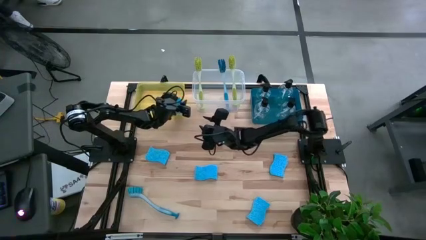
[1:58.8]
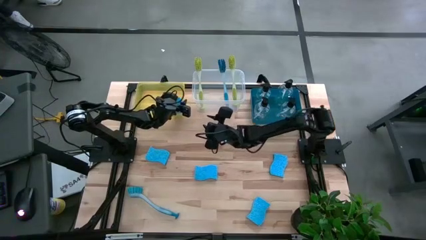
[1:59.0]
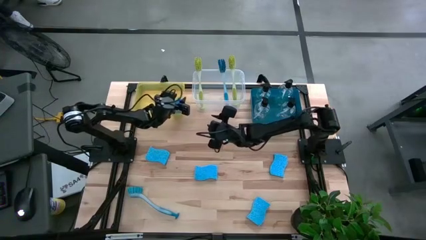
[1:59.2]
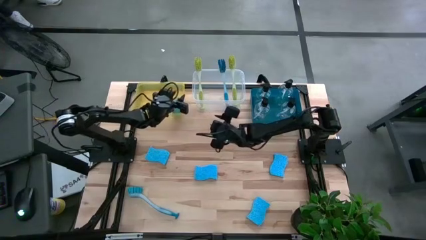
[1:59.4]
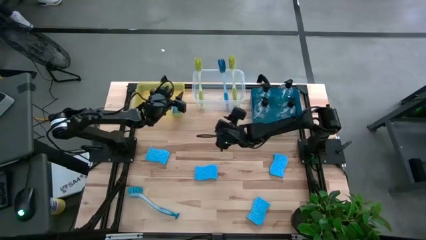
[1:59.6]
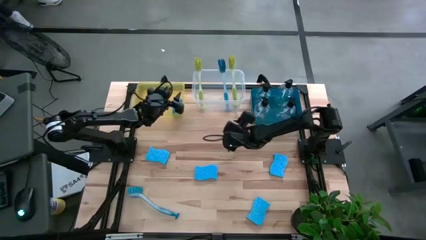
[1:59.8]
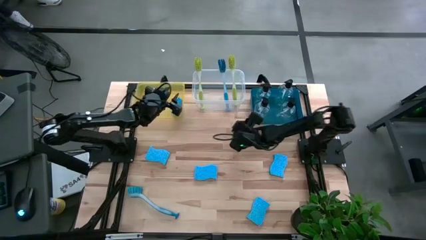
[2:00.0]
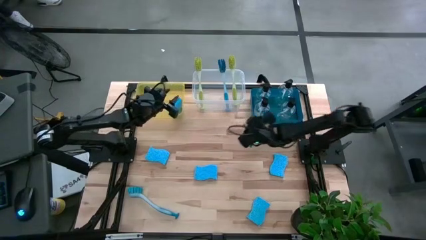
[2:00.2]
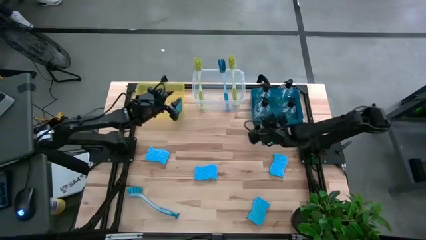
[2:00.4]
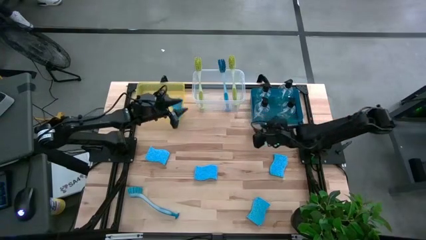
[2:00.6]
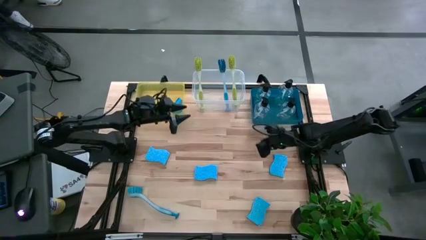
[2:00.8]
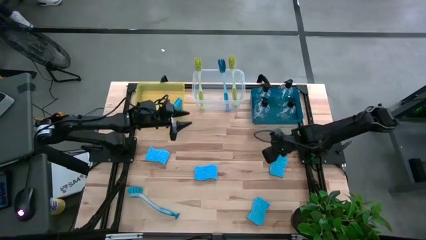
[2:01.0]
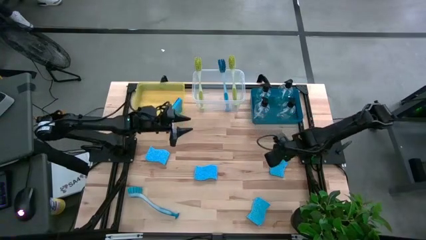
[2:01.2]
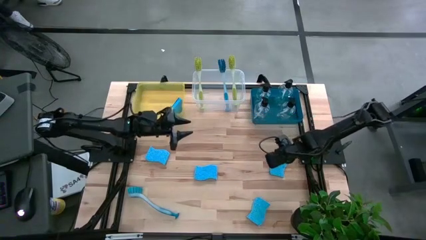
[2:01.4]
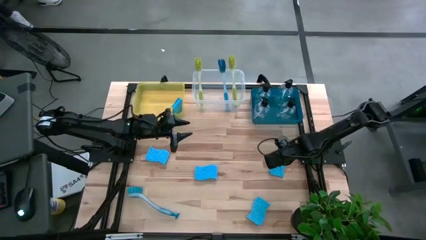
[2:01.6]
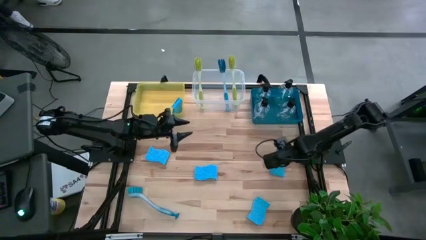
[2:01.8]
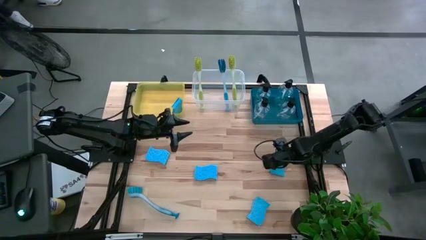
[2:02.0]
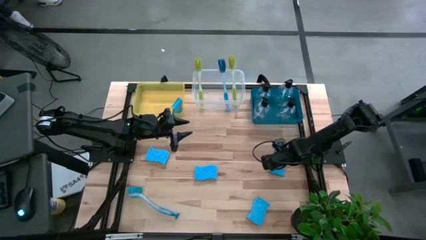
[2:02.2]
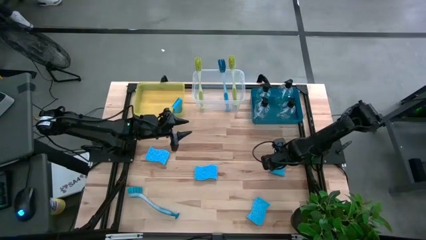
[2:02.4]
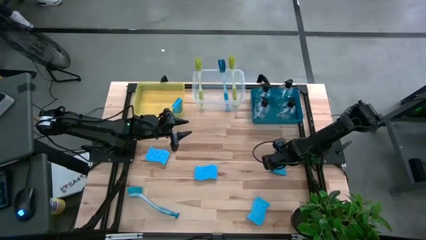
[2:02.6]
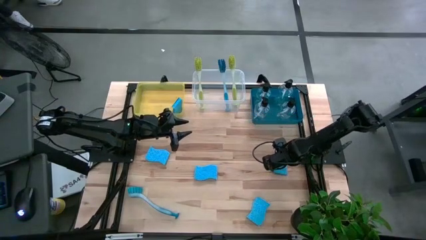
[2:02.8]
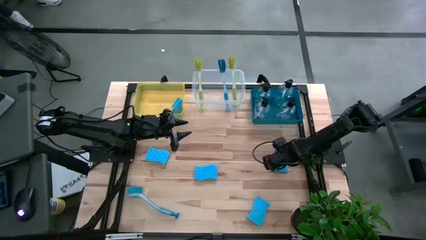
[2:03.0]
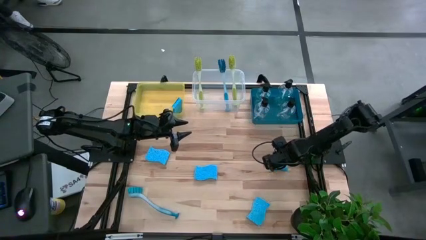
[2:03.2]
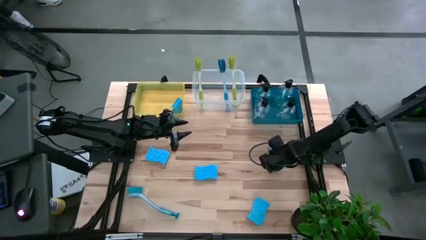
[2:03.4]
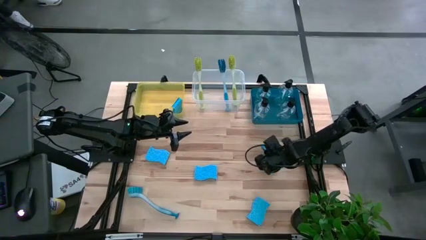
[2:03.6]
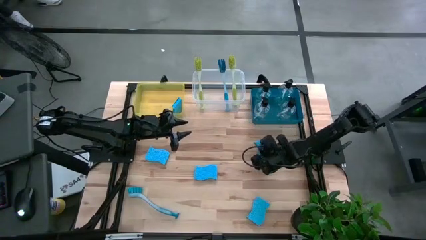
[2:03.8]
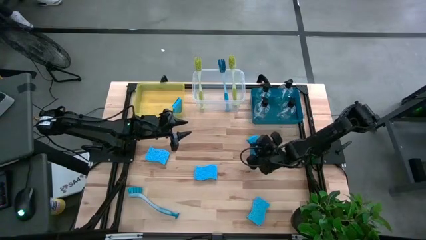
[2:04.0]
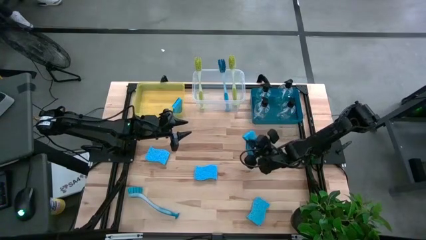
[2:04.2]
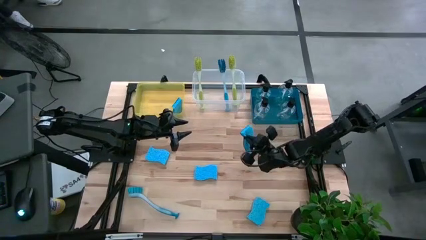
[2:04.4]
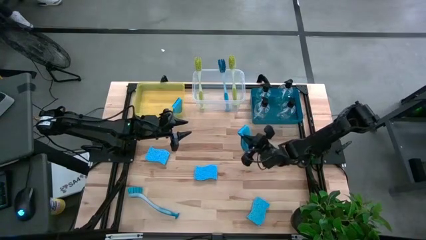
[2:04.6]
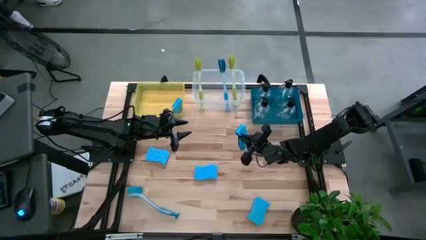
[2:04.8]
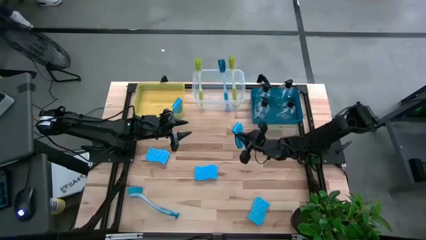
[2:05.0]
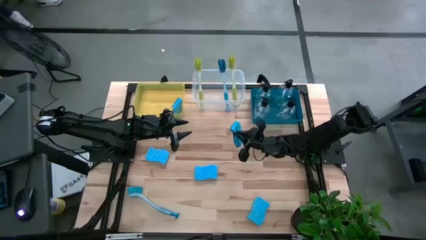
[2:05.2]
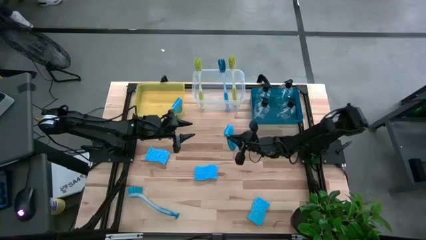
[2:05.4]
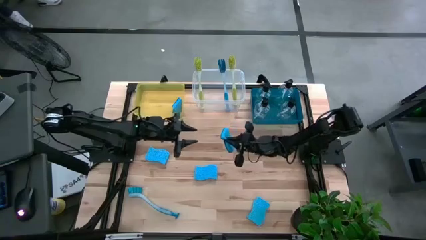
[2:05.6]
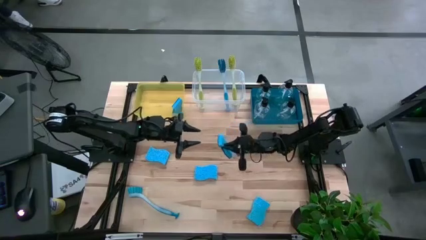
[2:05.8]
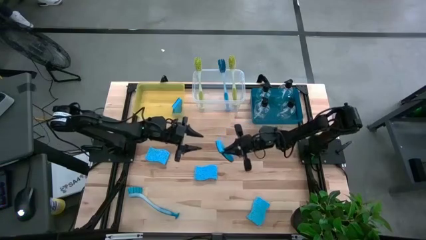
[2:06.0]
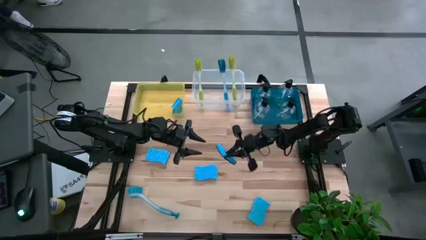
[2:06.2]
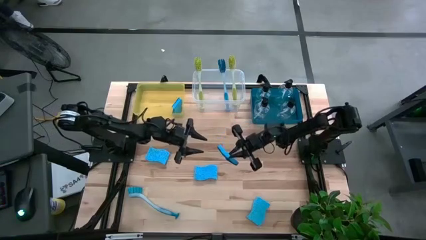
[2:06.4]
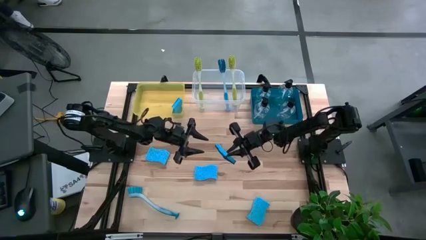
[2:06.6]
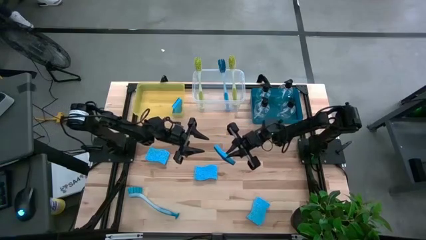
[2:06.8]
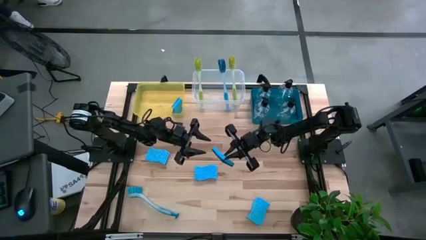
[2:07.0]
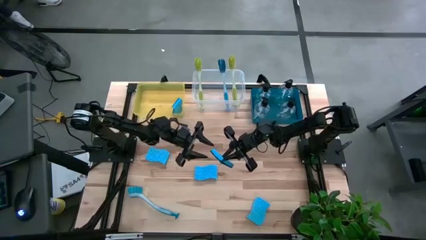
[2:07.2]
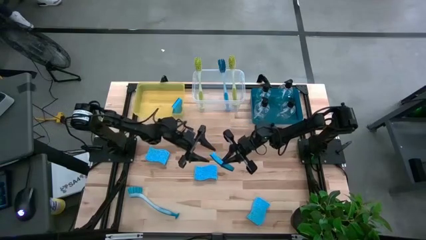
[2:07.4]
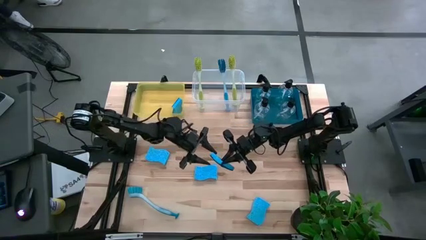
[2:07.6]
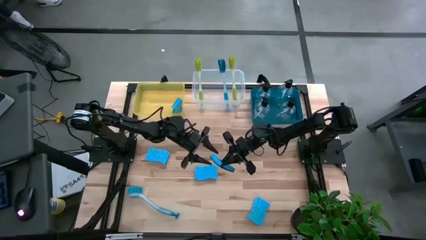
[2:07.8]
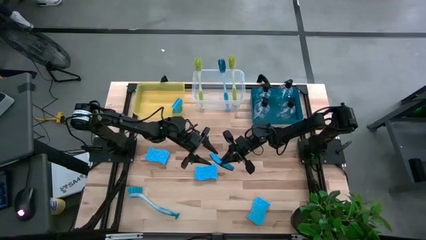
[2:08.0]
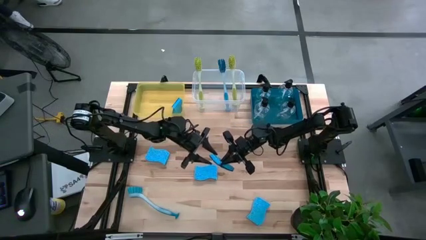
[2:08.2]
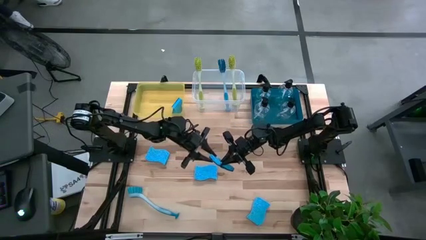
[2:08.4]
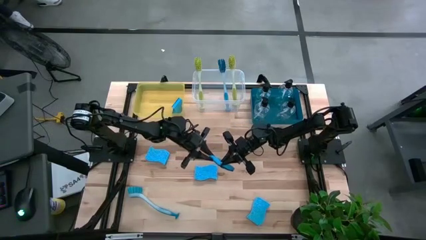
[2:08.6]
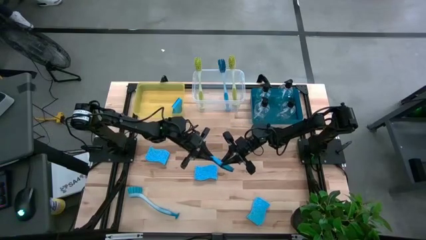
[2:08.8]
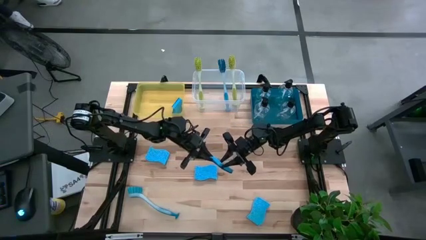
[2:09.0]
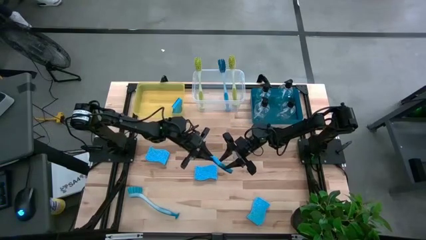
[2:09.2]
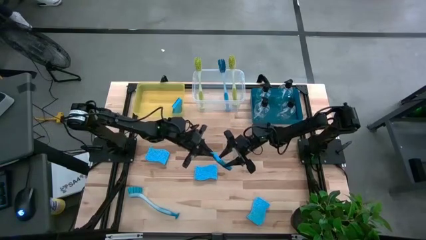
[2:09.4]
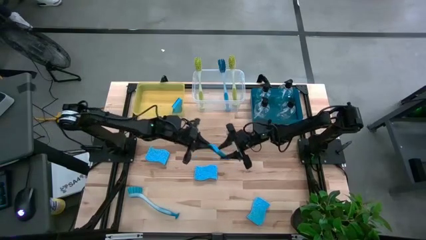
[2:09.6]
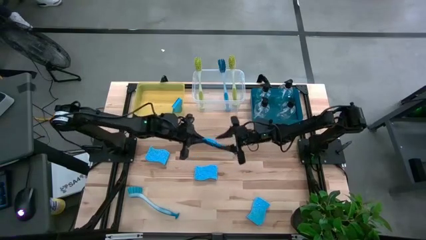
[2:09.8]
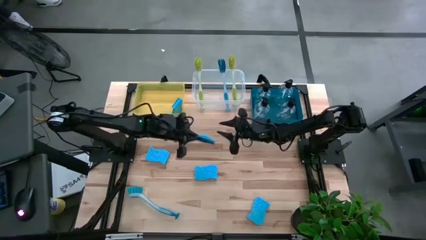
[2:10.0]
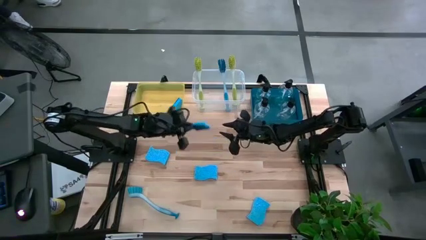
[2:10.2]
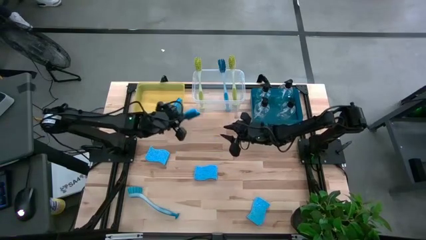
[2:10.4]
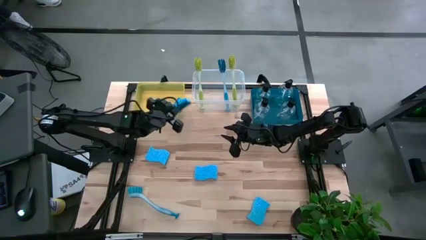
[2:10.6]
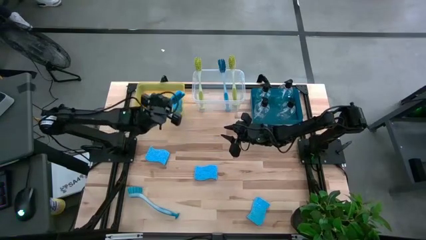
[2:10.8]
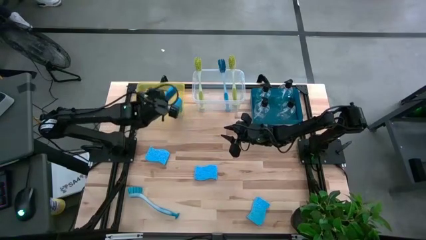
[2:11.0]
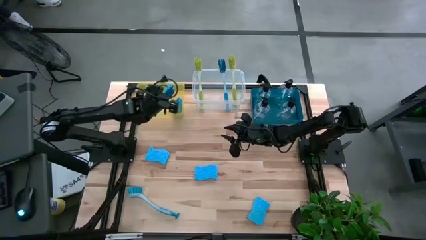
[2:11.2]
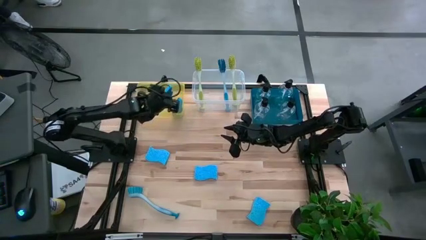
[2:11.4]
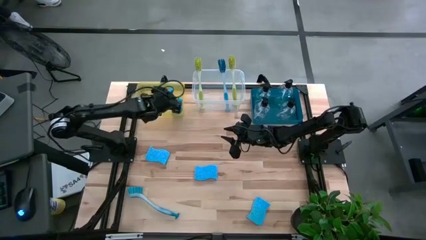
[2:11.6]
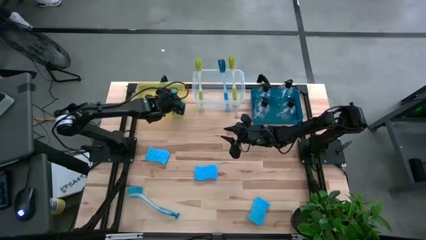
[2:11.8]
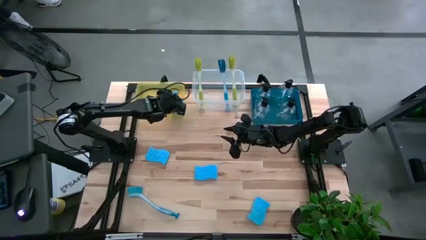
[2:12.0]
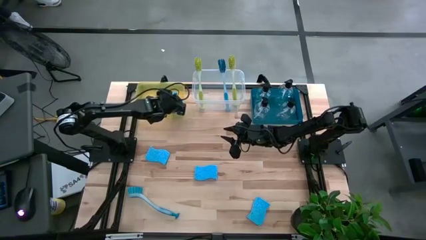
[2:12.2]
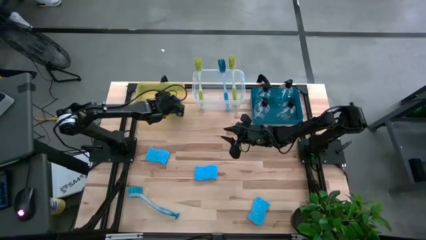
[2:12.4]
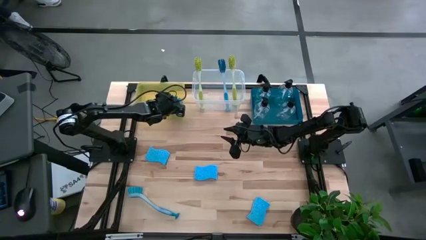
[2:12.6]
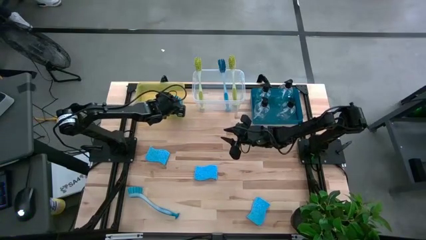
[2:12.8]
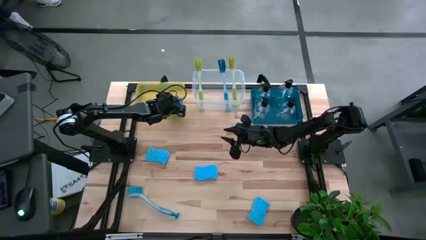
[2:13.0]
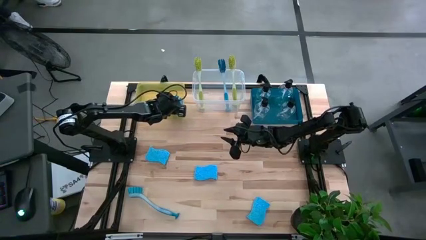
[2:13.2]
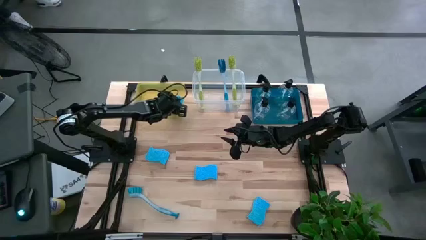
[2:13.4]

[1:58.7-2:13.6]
Task: Pick & Place Kitchen Sink Supplies
Put the blue sponge into the yellow bin

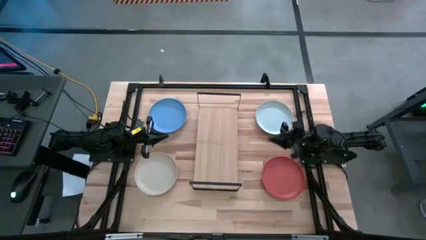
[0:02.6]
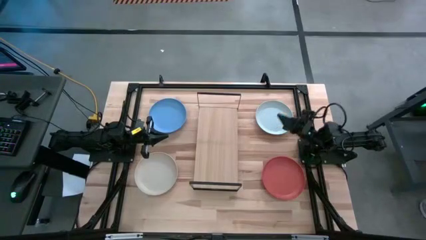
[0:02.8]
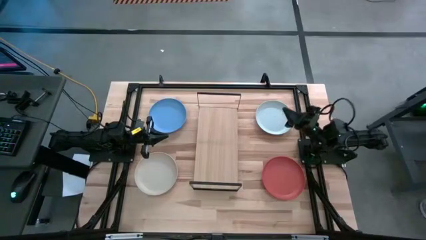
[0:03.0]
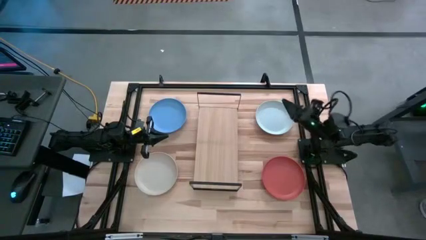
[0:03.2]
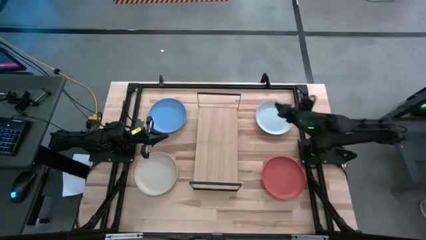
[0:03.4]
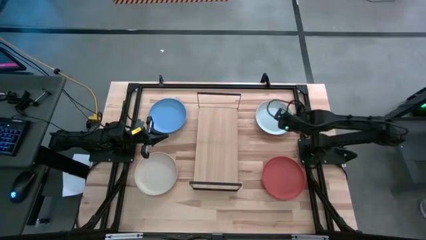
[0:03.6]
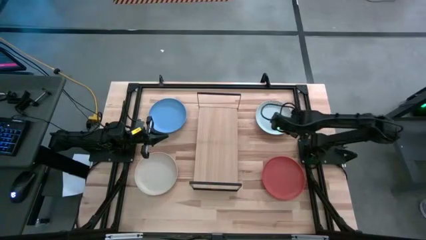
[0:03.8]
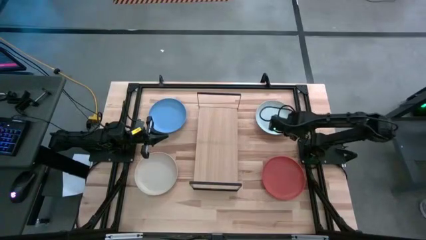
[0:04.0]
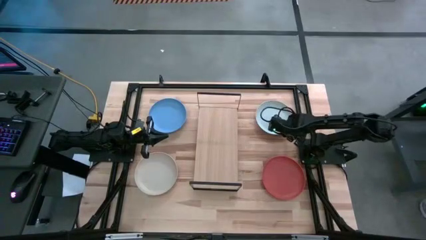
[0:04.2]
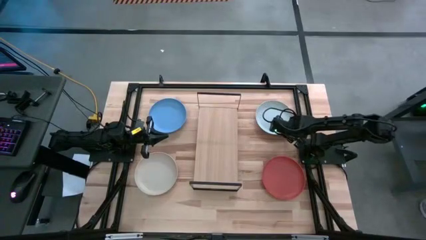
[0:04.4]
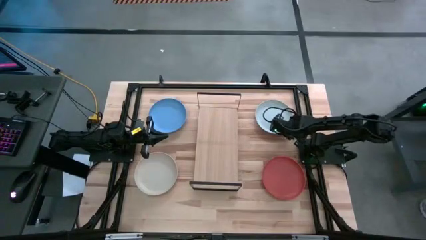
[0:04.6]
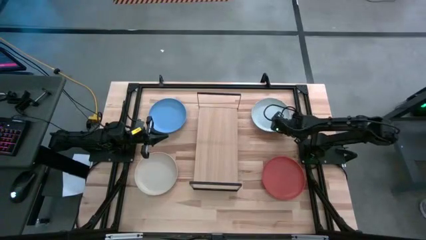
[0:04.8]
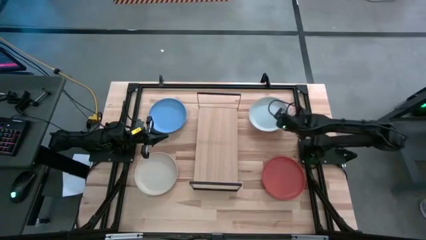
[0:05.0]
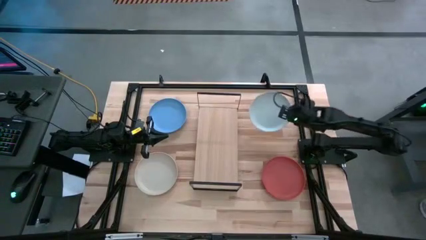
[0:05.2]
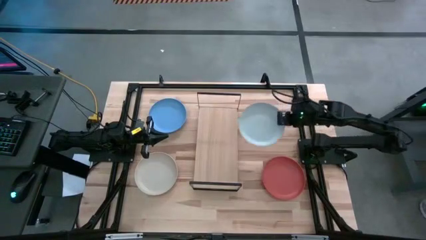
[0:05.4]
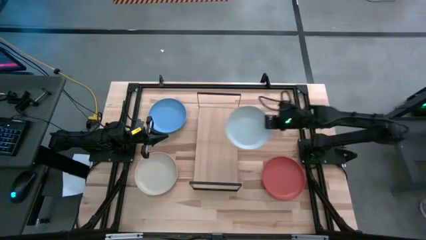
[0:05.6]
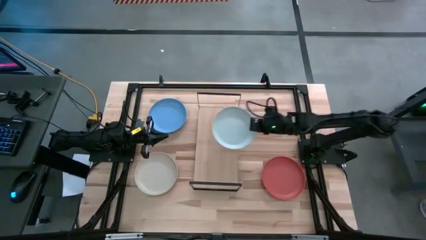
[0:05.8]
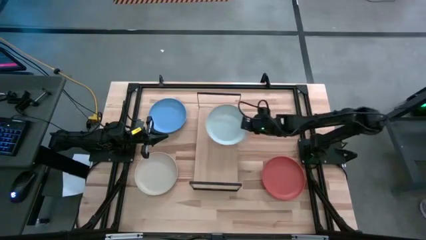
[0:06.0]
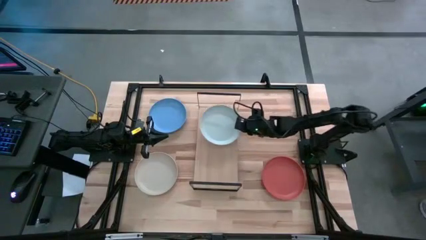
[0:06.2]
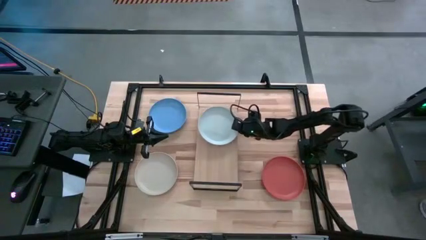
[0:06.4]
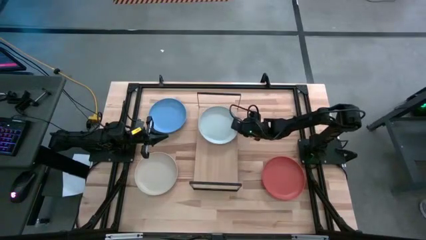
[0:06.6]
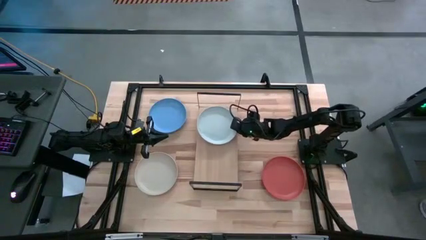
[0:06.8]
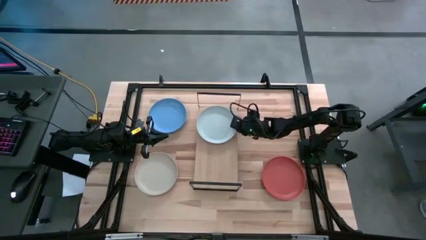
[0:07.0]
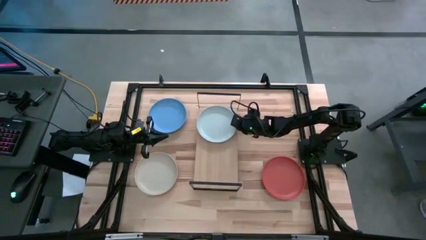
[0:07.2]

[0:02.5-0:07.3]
Task: Place and stack plates onto a shelf
Put the white plate on the shelf
